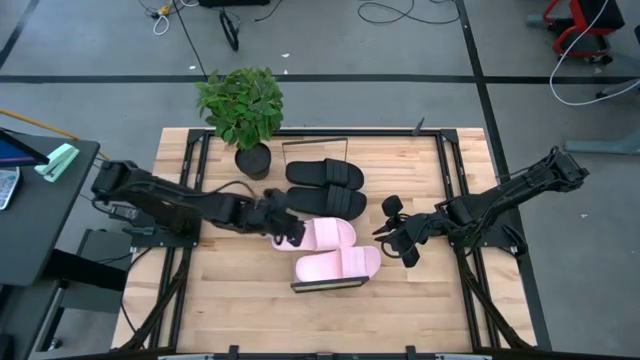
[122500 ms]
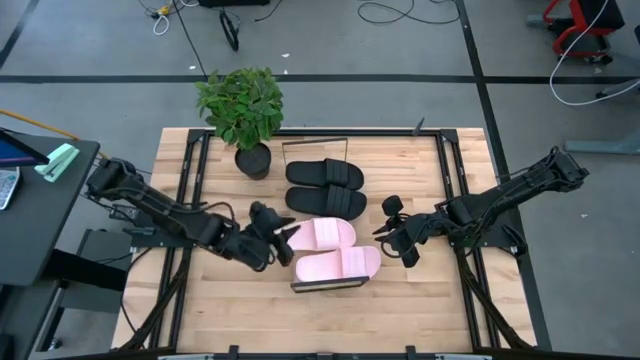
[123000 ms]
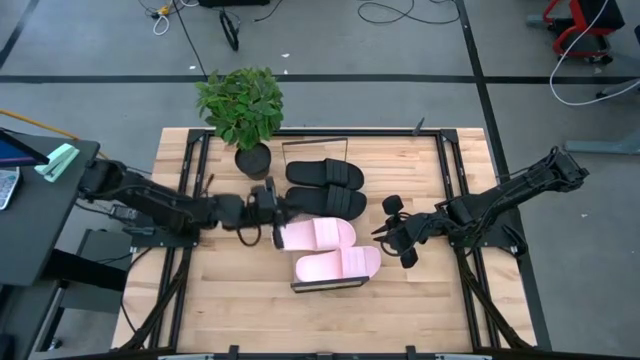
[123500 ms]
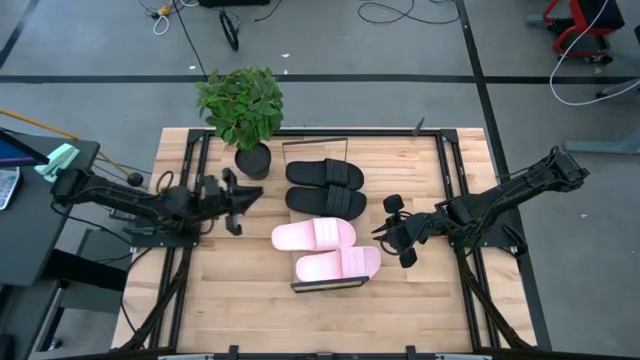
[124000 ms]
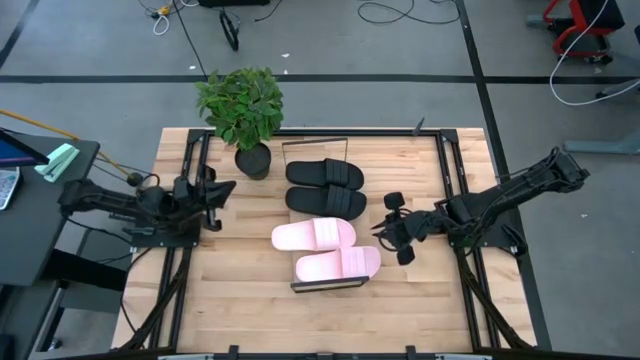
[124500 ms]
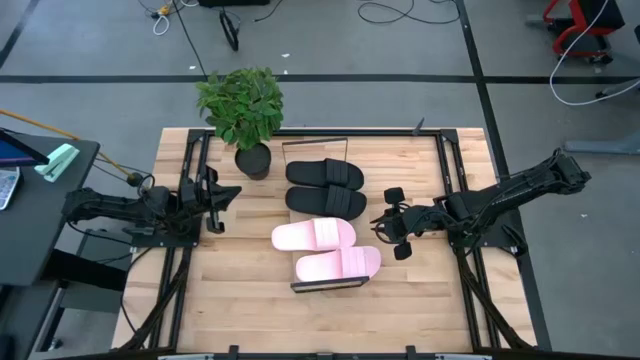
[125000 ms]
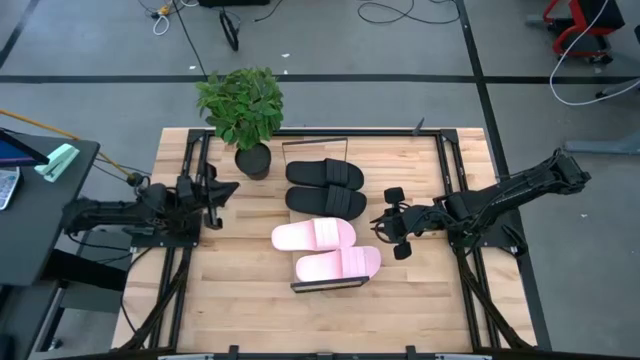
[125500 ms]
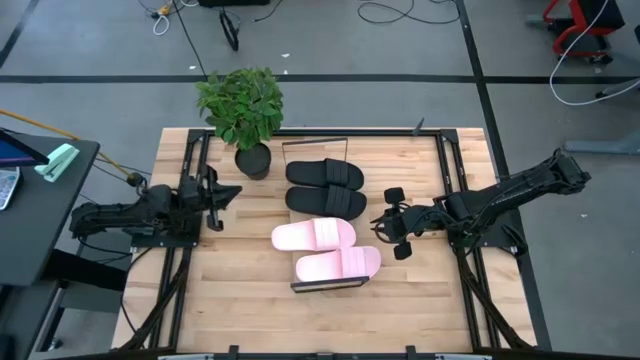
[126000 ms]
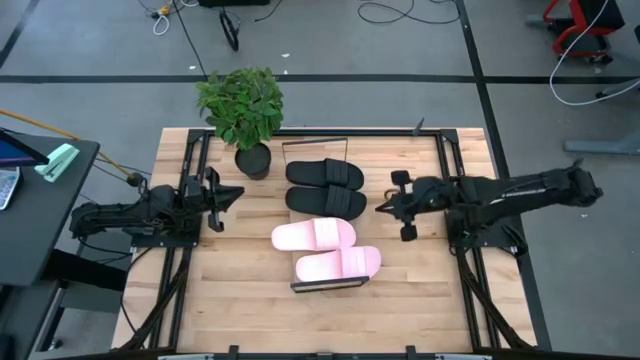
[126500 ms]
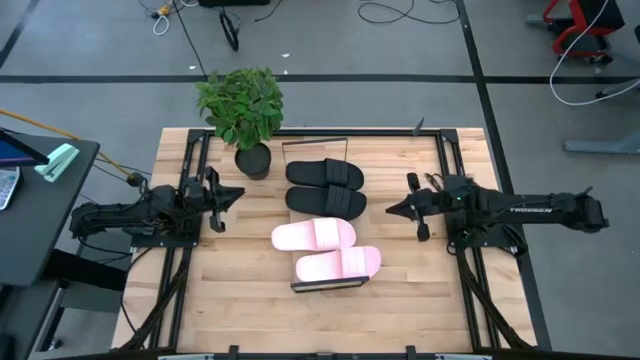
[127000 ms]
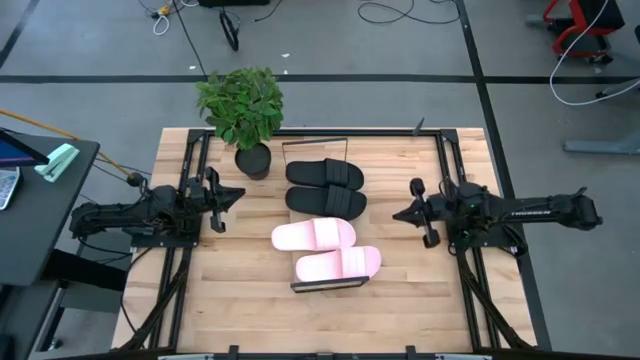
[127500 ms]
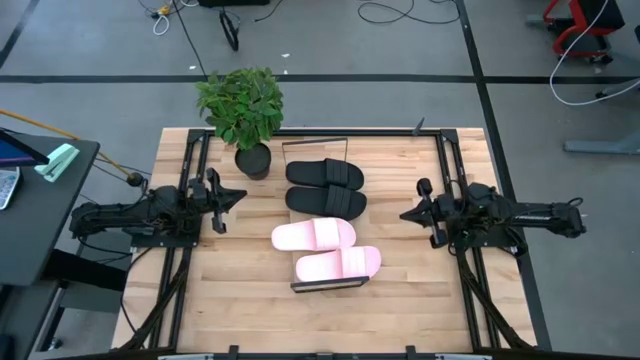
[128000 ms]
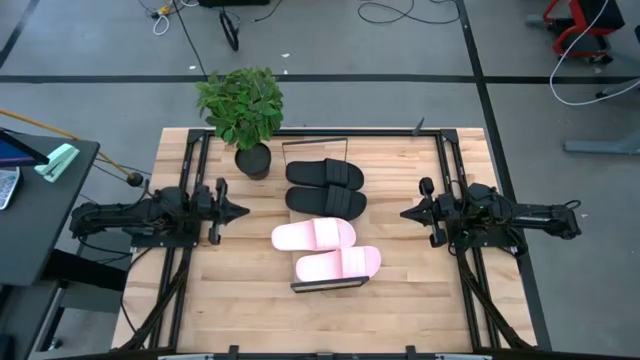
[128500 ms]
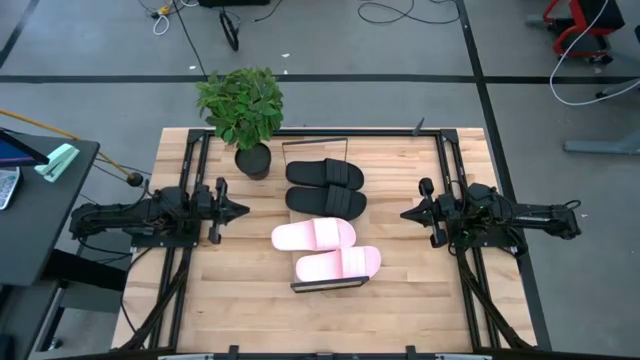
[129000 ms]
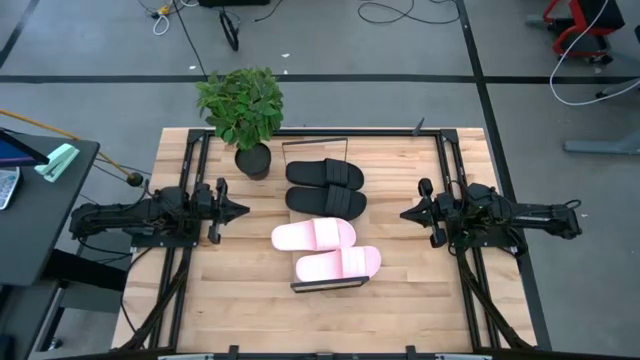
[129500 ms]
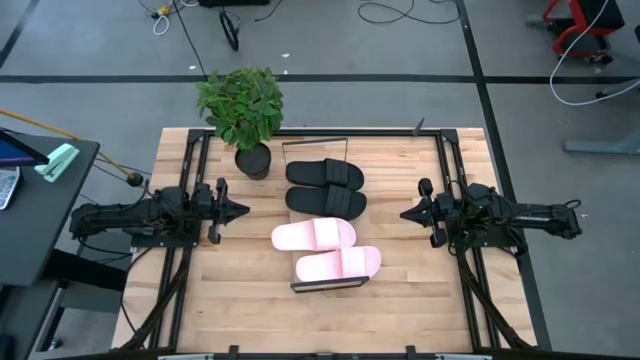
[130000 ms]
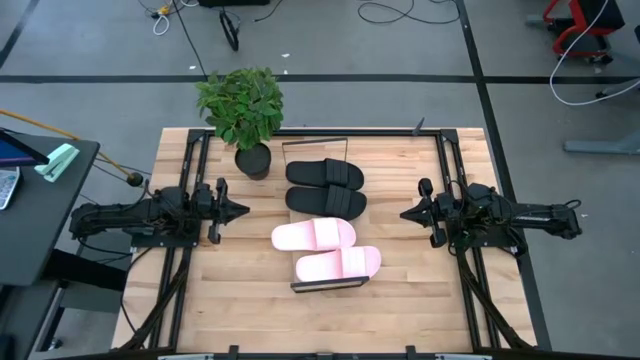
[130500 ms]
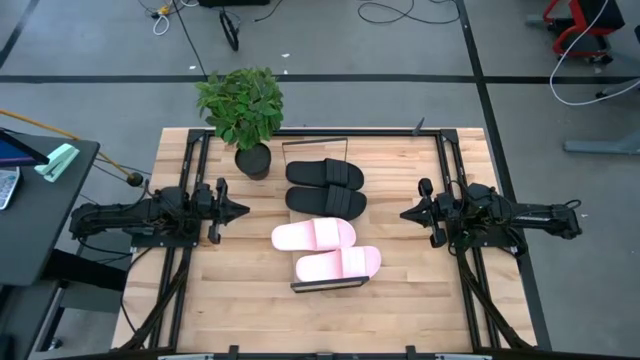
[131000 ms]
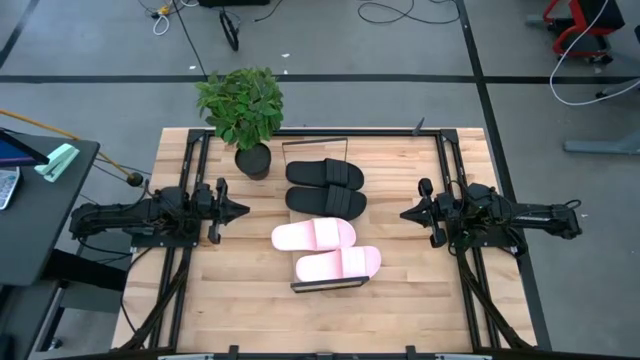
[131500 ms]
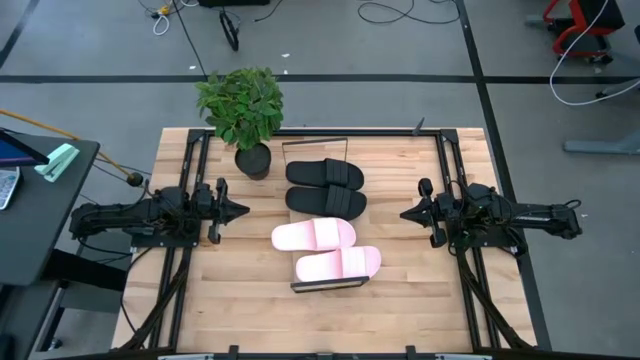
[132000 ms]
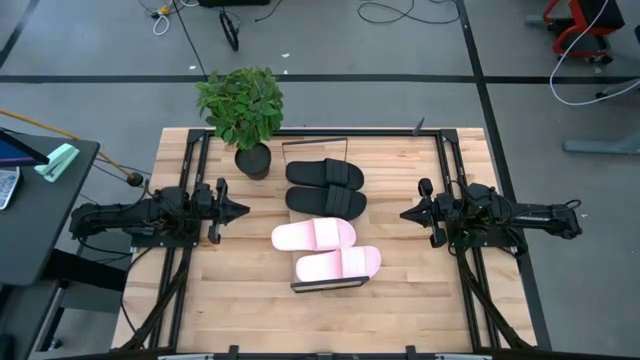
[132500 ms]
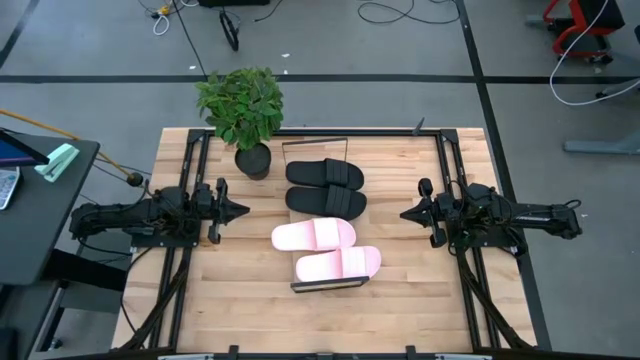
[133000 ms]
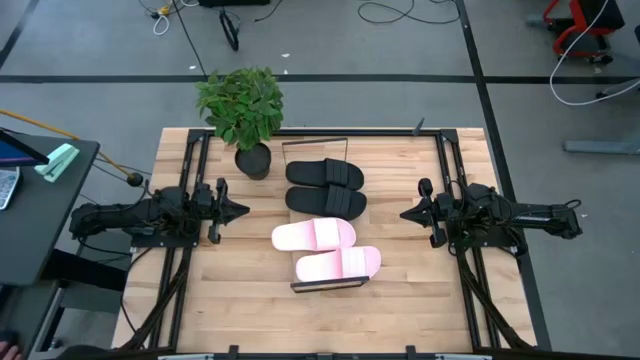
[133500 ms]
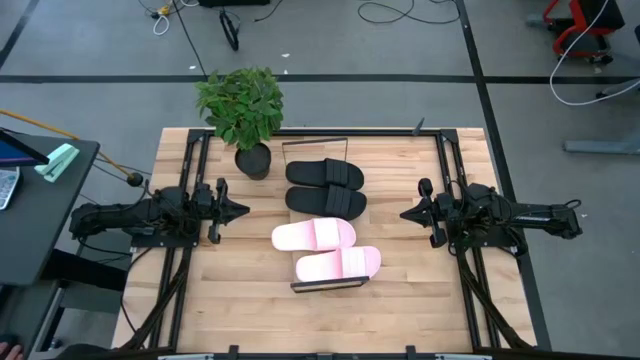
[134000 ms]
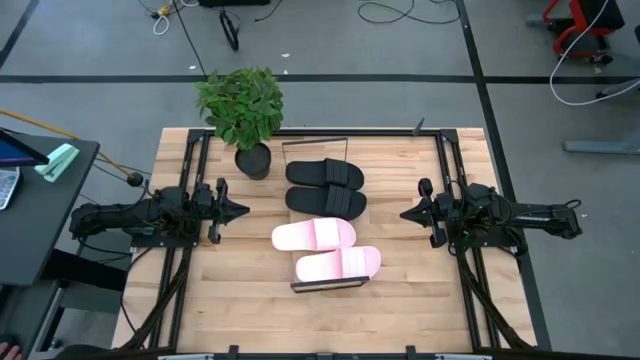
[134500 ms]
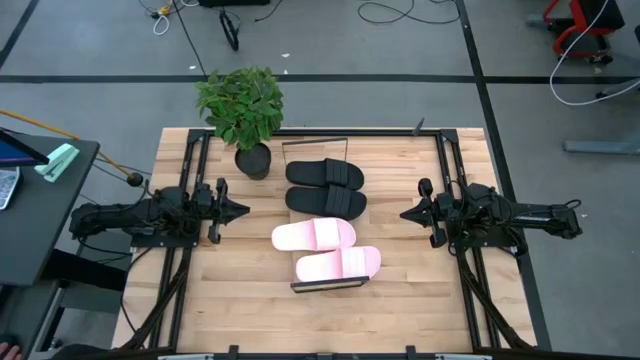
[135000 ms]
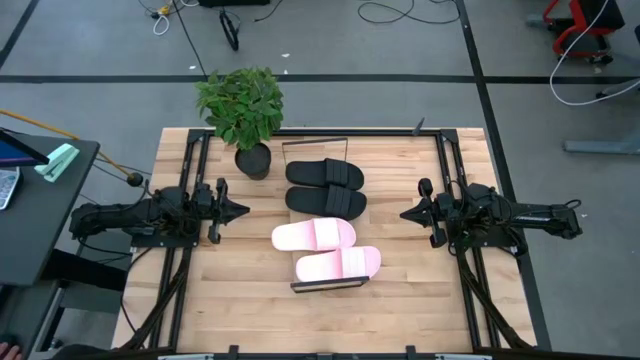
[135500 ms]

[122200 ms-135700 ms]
Task: Pick and place slides into the shelf
Return to Home Position

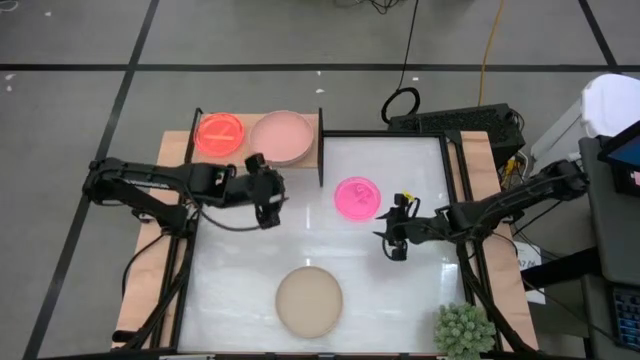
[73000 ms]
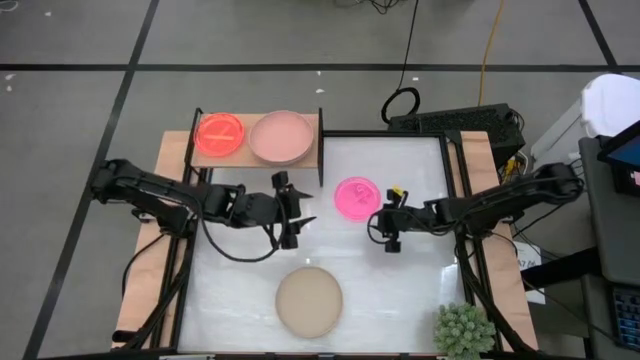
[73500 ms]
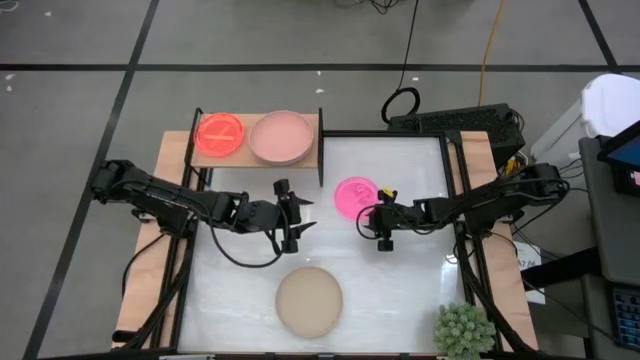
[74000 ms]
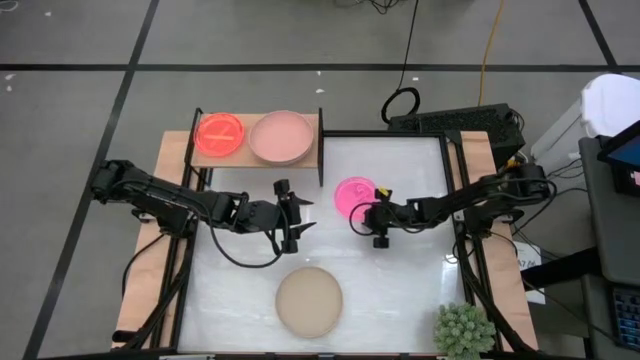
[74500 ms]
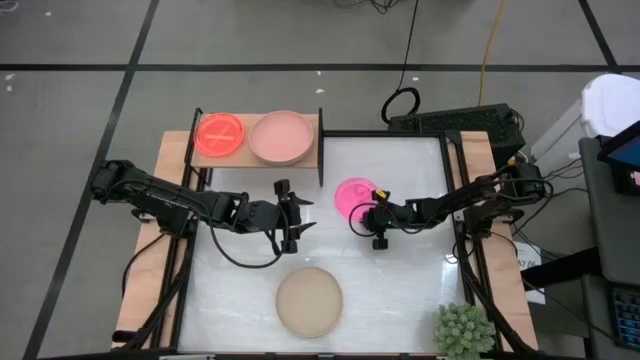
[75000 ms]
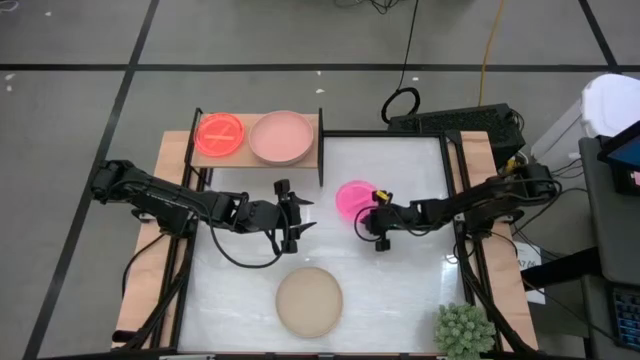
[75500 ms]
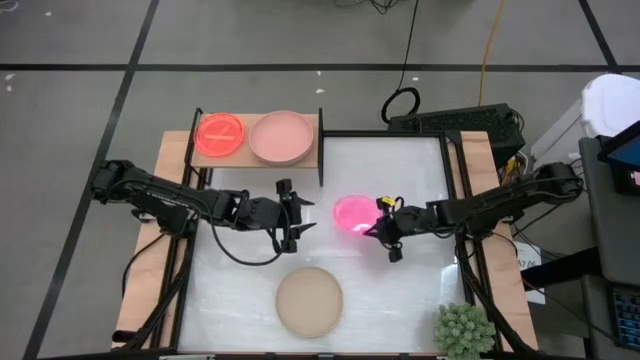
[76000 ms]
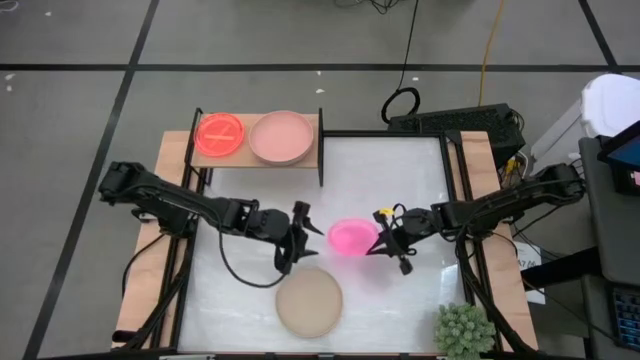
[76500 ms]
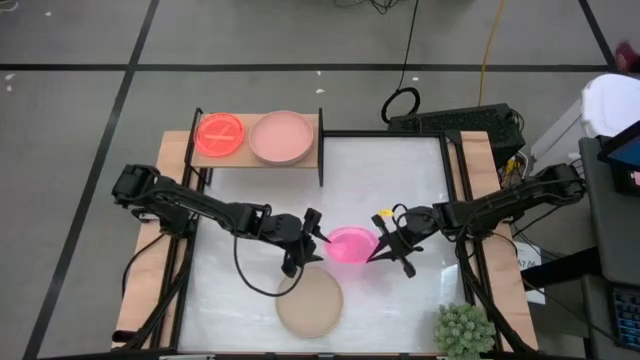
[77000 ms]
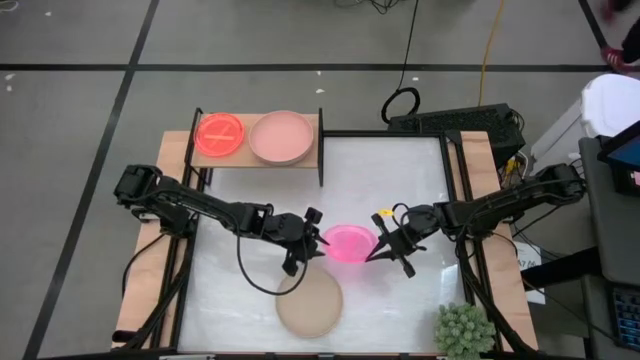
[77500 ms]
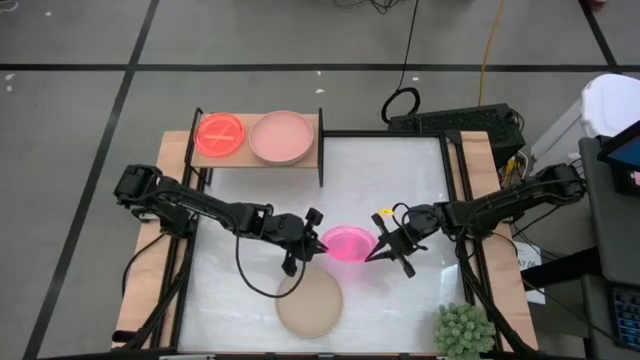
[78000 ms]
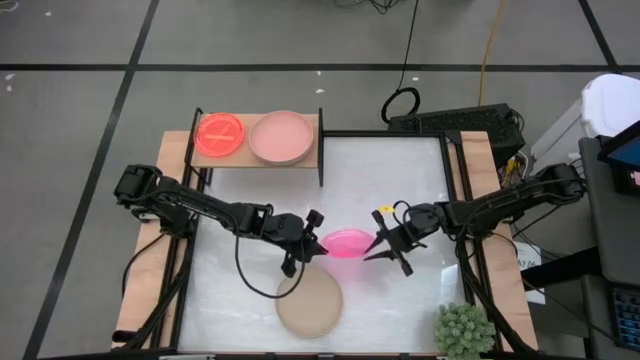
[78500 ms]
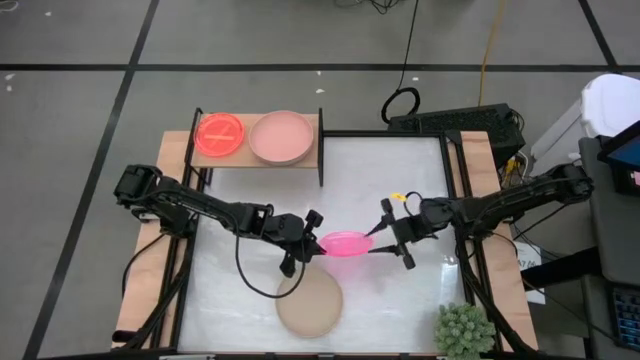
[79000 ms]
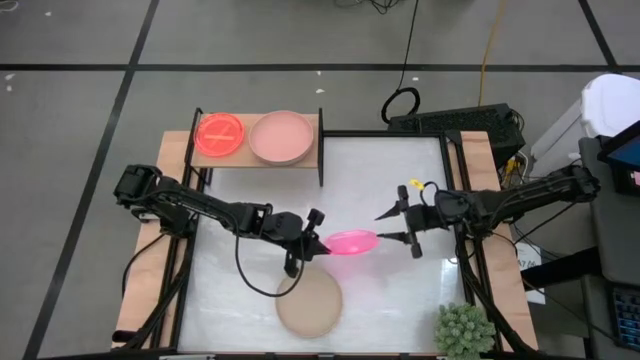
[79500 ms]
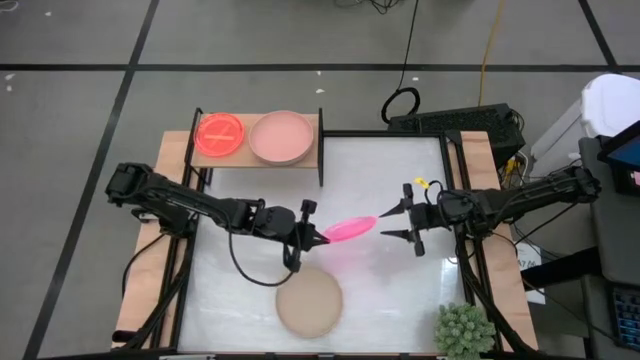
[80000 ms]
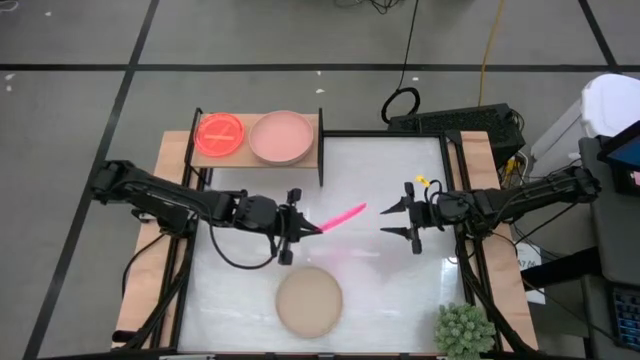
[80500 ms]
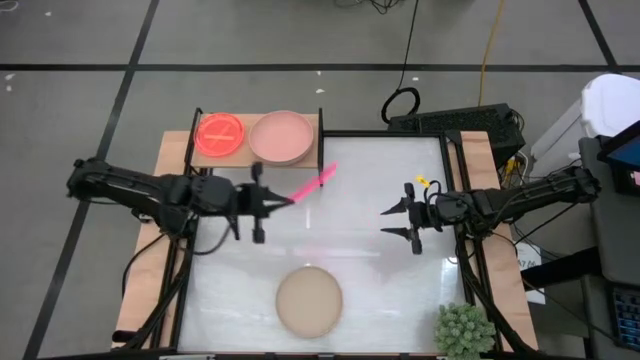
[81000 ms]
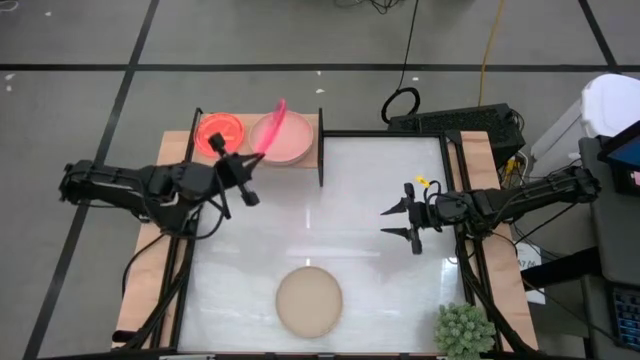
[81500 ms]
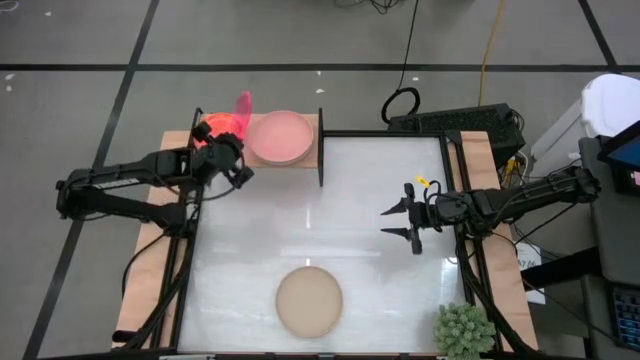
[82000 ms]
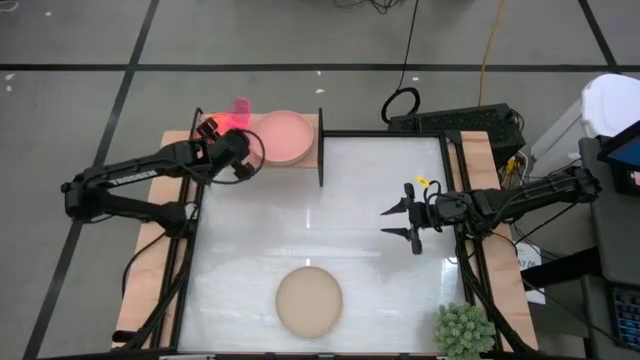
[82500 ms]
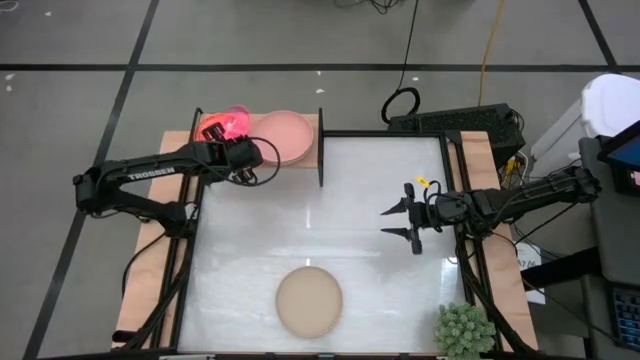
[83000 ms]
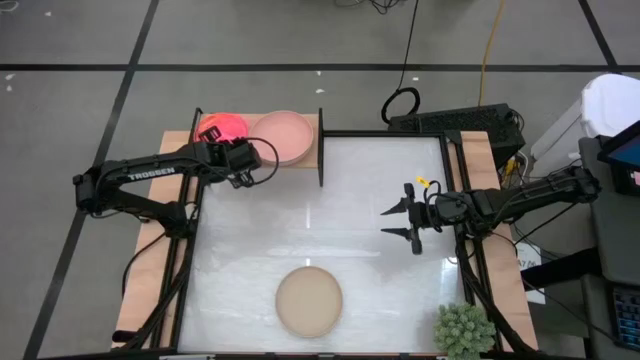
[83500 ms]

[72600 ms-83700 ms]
Task: Place and stack plates onto a shelf
Stack the small pink plate on top of the small orange plates on the shelf
